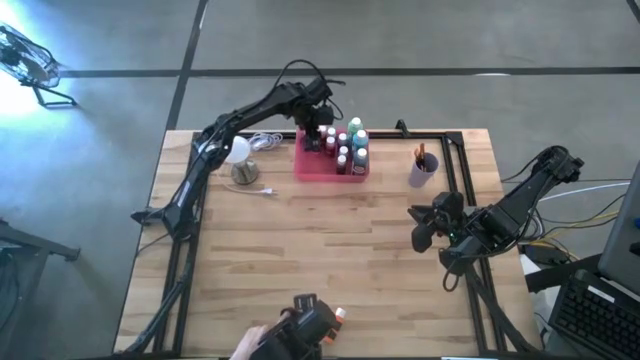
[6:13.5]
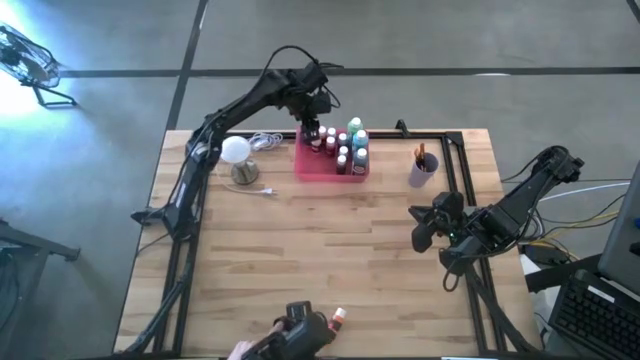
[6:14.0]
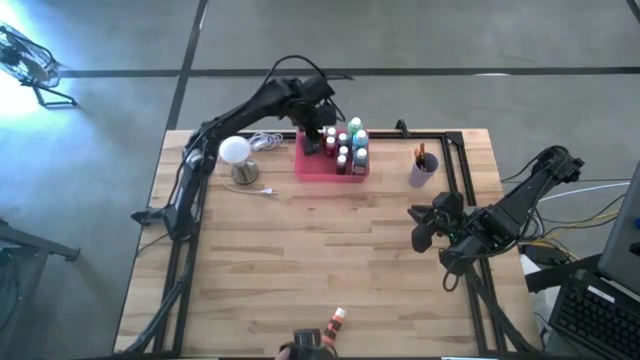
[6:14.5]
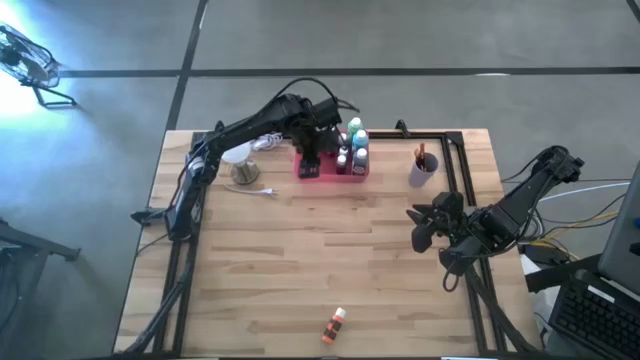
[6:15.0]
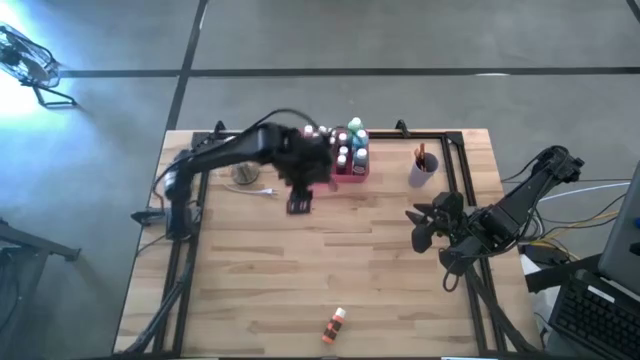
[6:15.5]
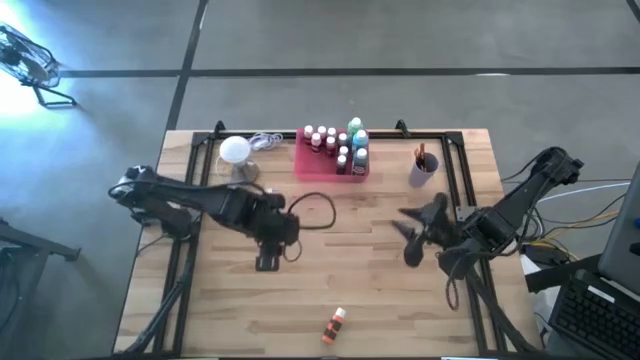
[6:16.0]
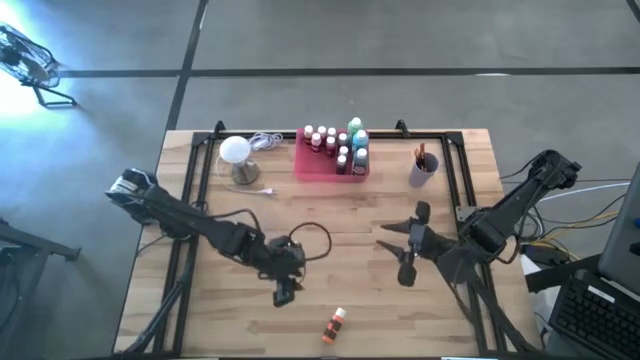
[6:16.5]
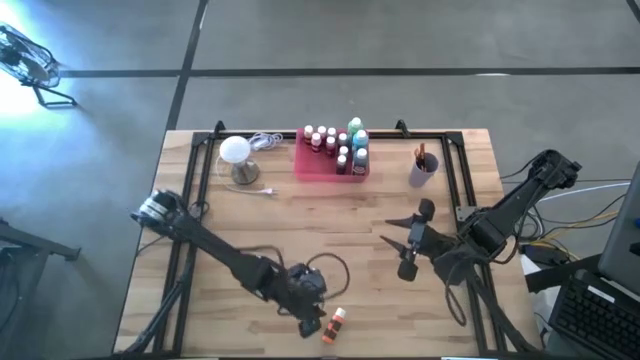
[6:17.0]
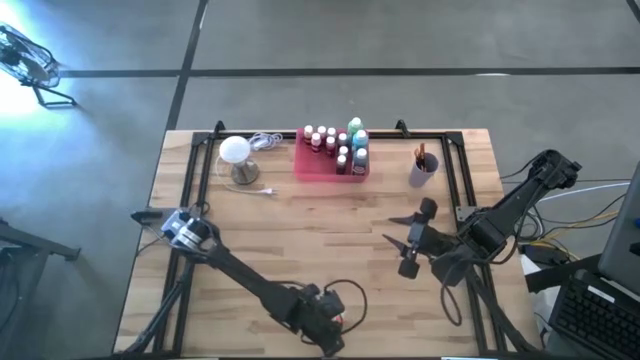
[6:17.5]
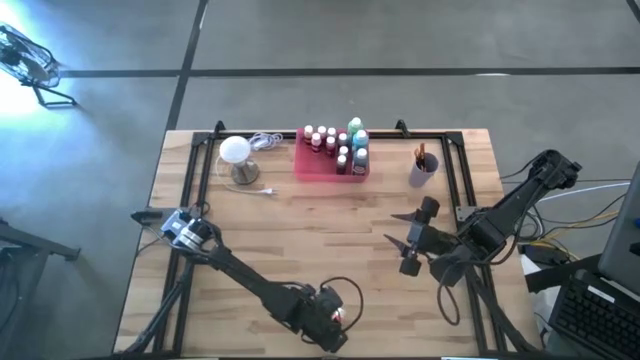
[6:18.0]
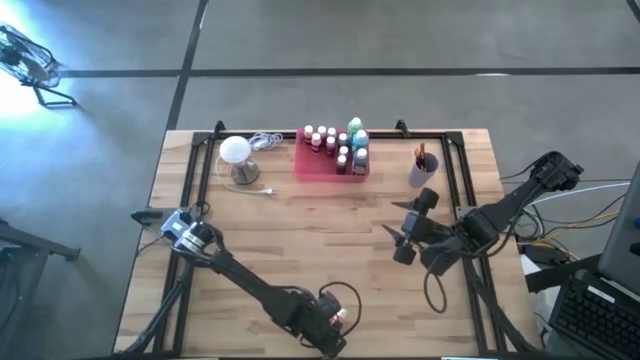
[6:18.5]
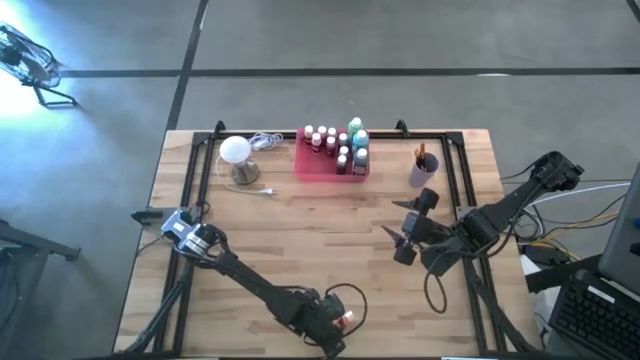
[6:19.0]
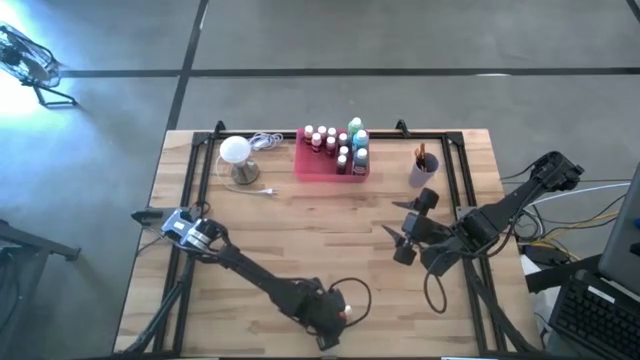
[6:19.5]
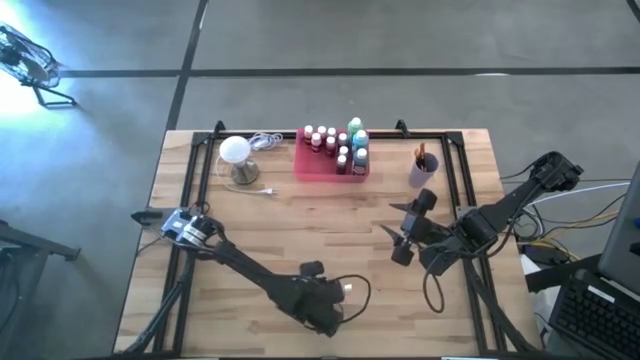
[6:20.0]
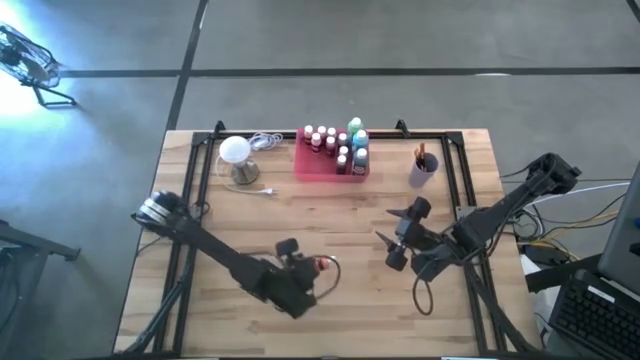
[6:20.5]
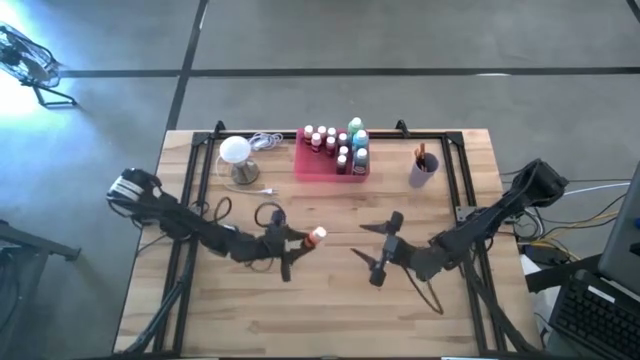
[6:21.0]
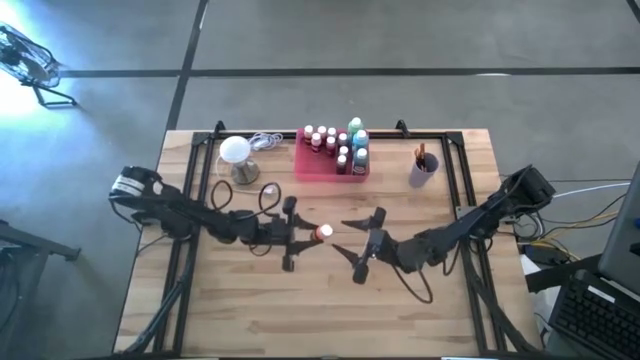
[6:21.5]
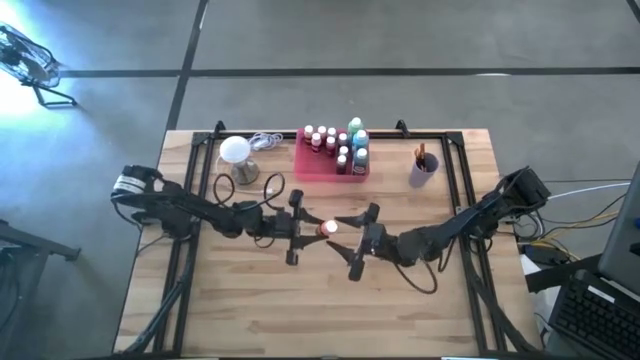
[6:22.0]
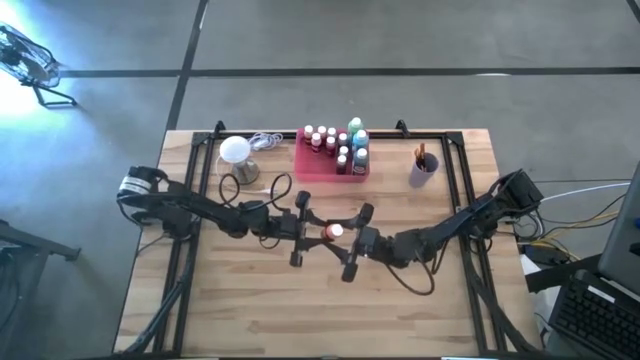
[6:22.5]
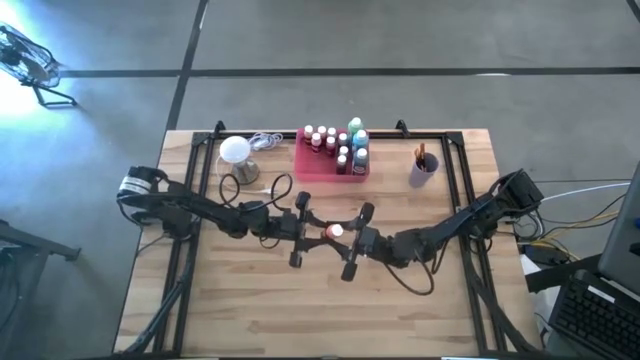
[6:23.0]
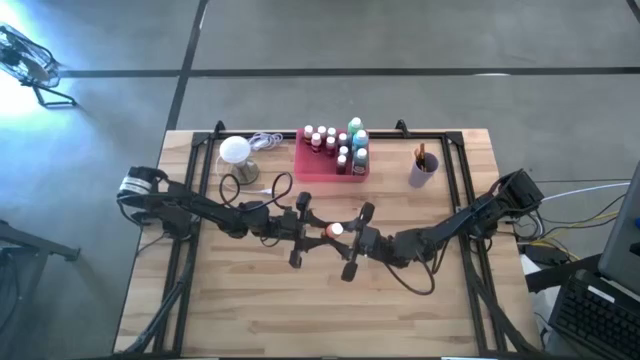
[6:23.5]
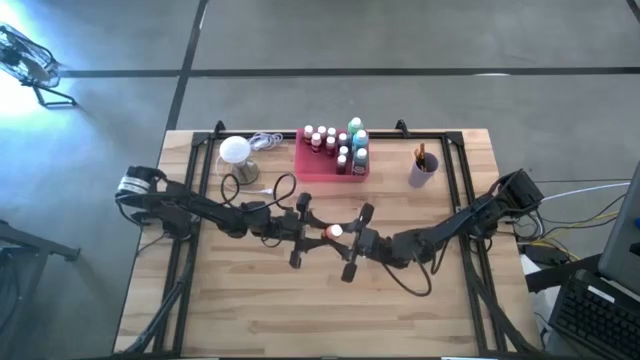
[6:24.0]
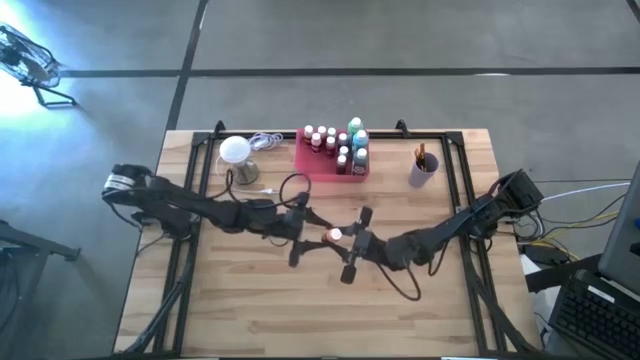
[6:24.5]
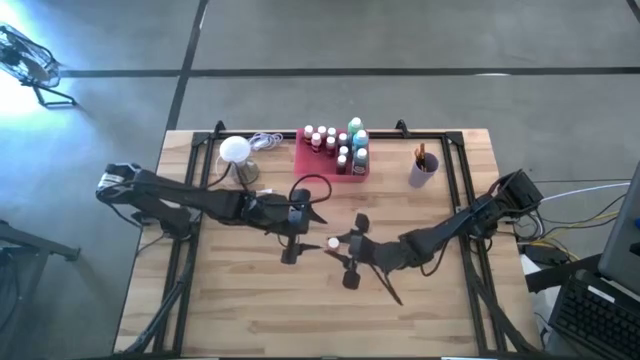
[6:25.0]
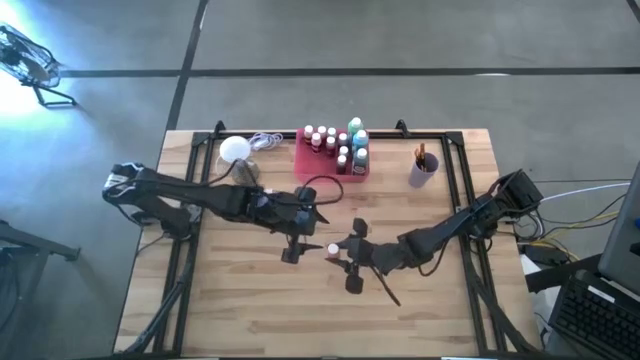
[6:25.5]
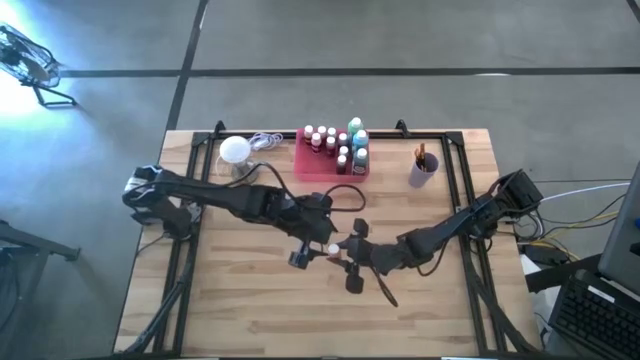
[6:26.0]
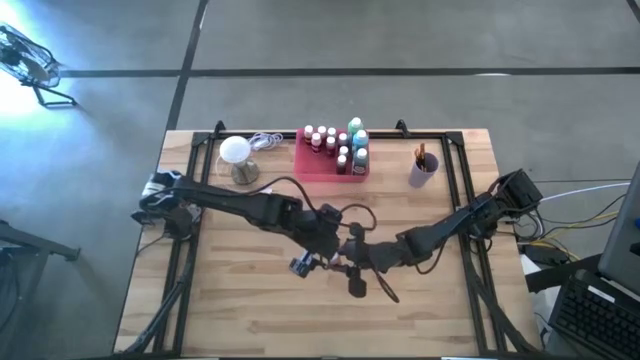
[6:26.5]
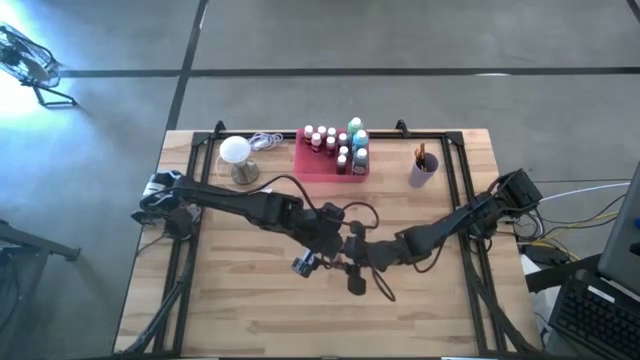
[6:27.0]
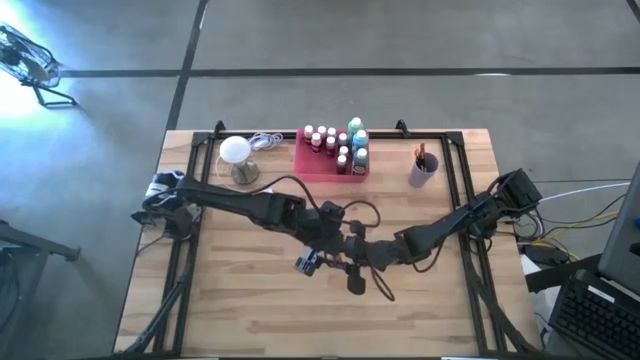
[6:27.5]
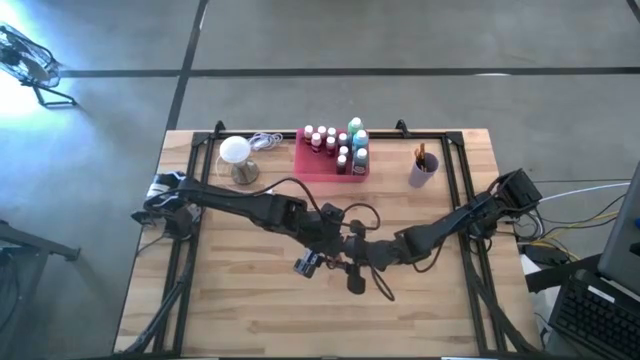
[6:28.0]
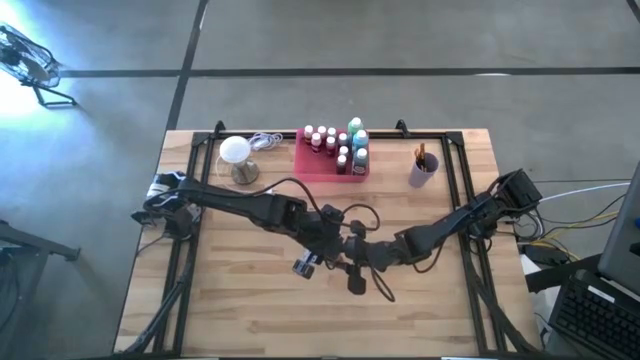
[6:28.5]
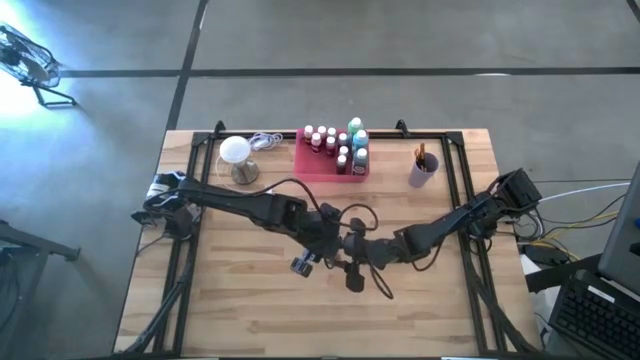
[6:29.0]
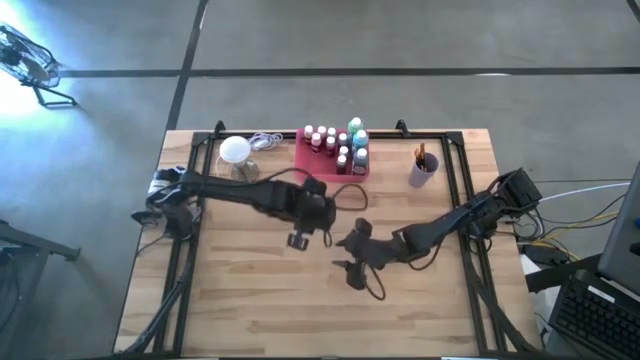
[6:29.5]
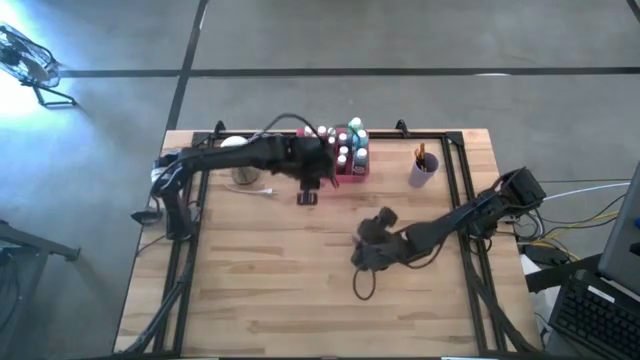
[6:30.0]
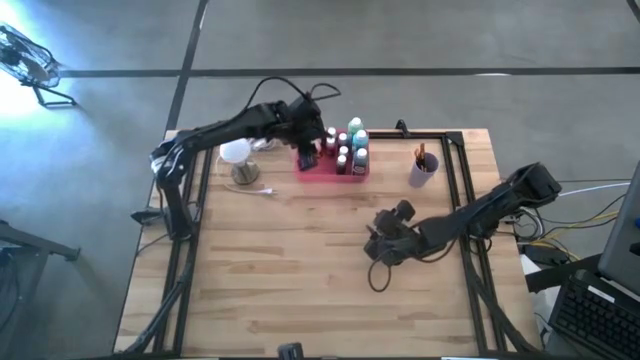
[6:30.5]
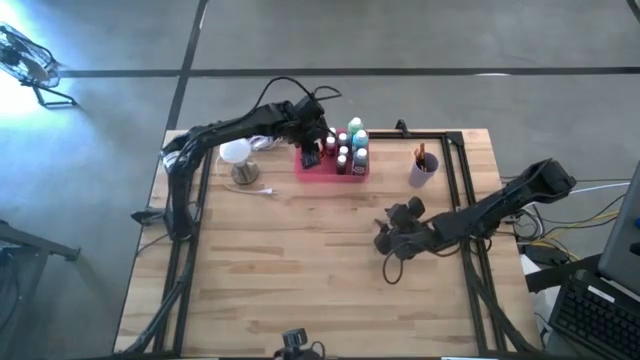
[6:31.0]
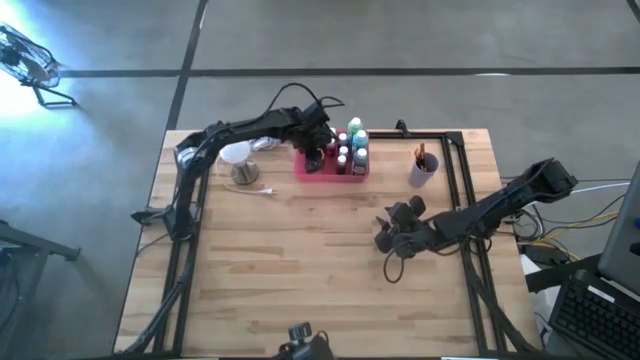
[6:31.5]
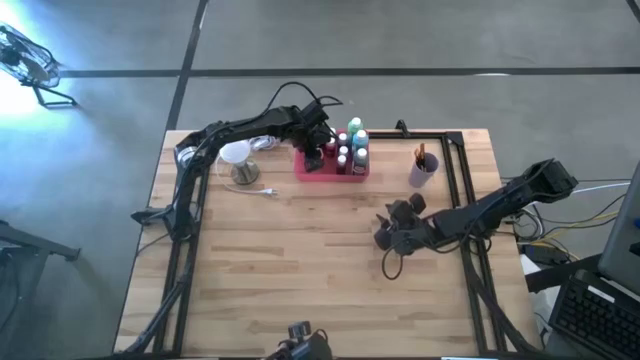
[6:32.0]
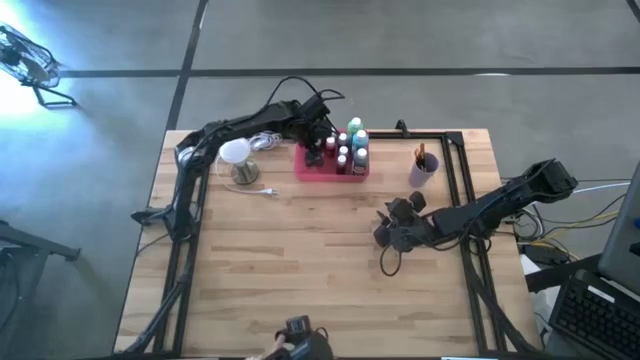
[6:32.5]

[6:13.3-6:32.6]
Task: Pick & Place Paint Supplies
Put the orange black paint bottle into the pink bin

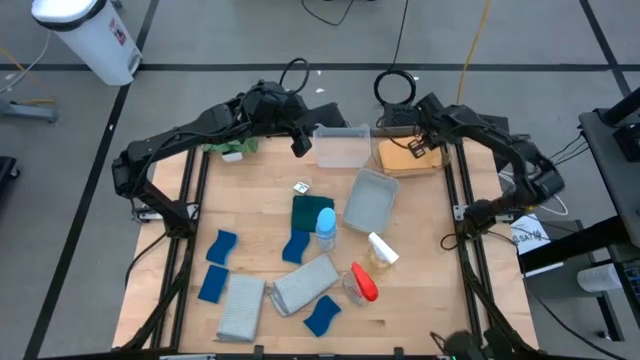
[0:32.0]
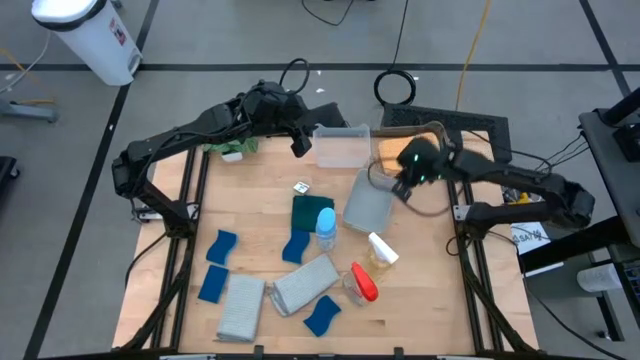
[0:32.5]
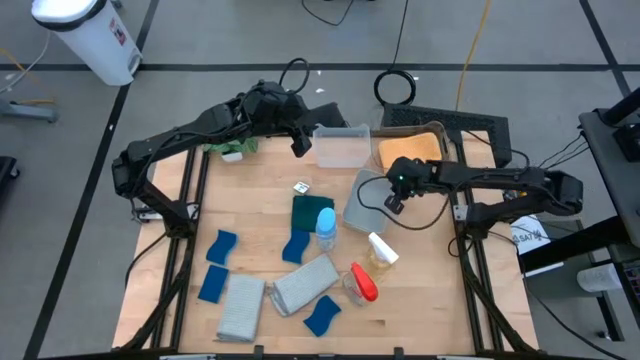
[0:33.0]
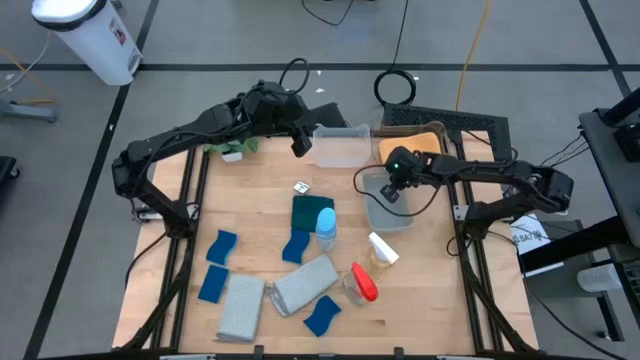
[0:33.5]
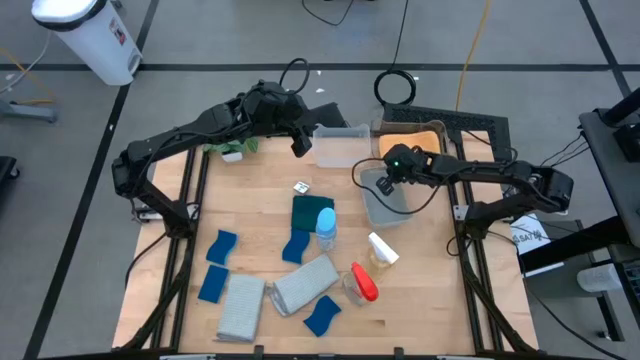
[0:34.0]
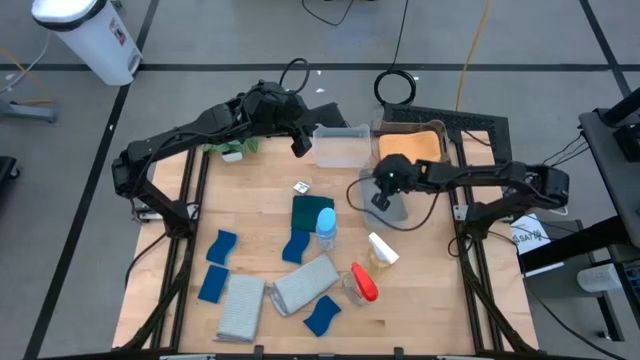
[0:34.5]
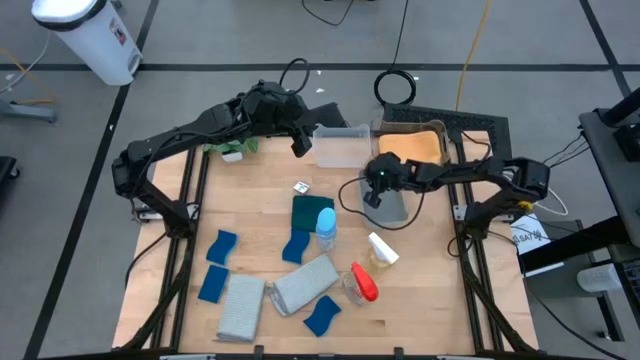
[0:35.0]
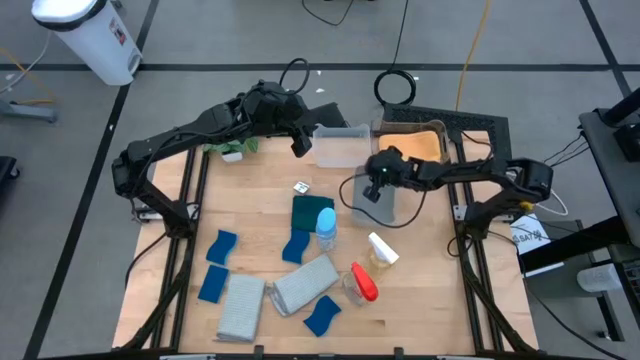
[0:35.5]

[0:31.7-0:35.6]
Task: Pick & Place Kitchen Items
Adjust the gray bin on the table
